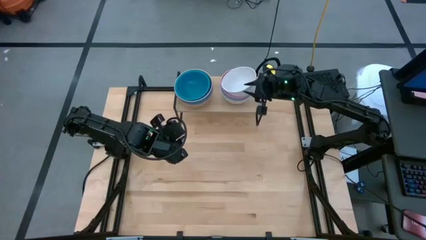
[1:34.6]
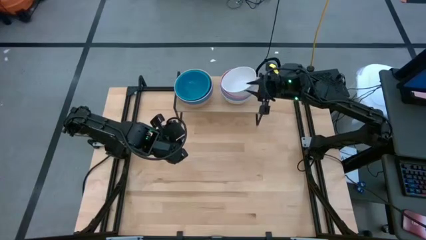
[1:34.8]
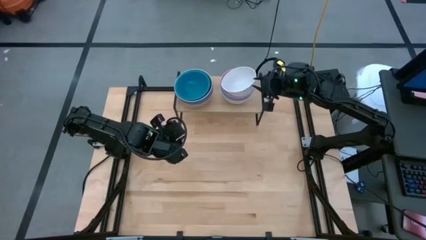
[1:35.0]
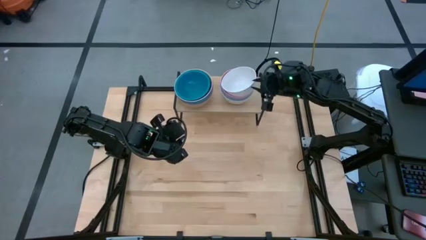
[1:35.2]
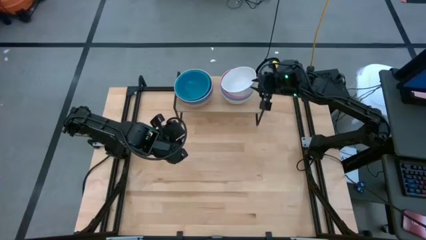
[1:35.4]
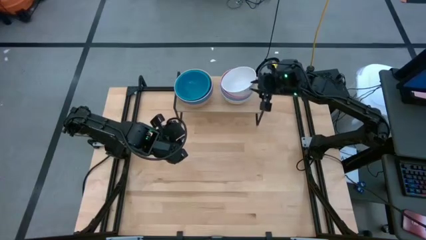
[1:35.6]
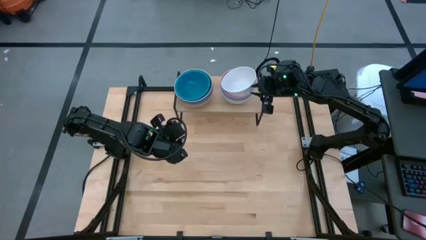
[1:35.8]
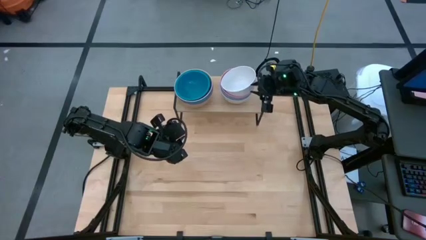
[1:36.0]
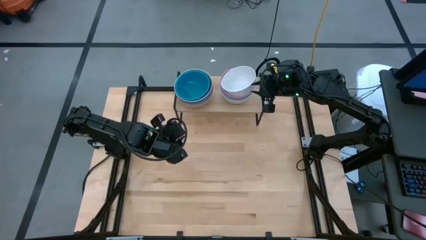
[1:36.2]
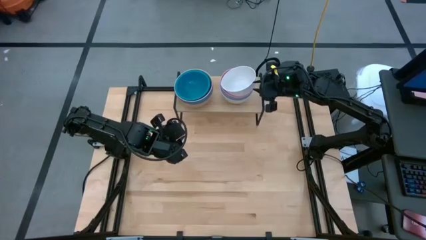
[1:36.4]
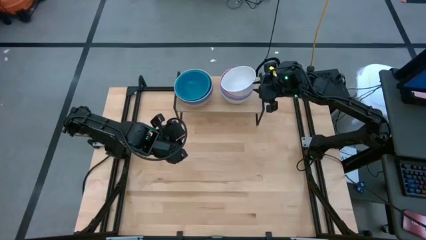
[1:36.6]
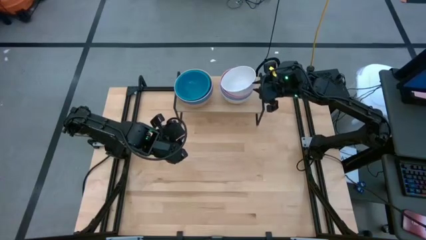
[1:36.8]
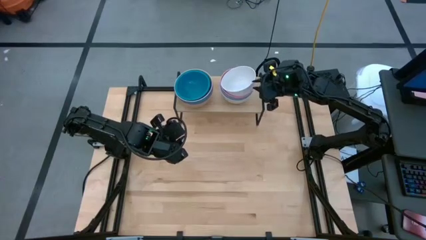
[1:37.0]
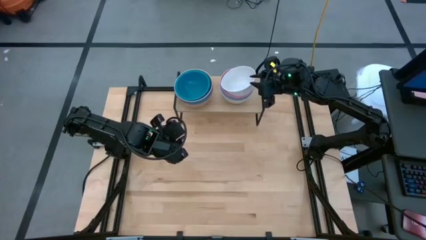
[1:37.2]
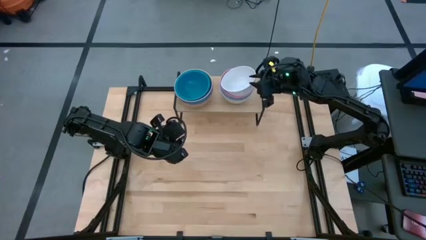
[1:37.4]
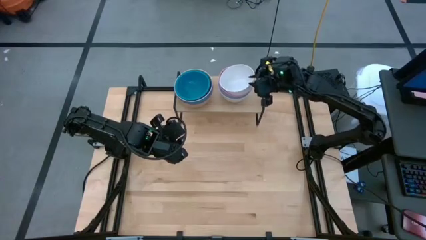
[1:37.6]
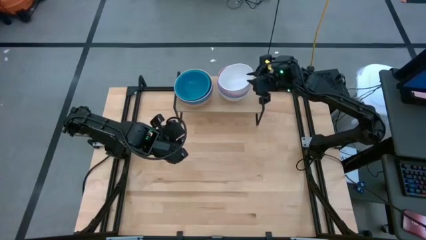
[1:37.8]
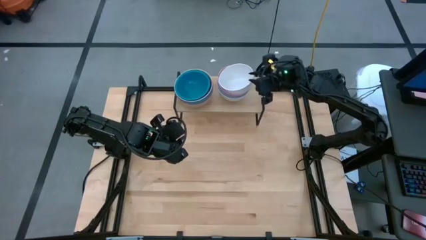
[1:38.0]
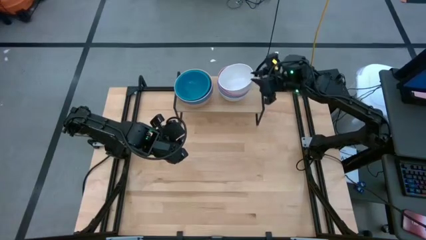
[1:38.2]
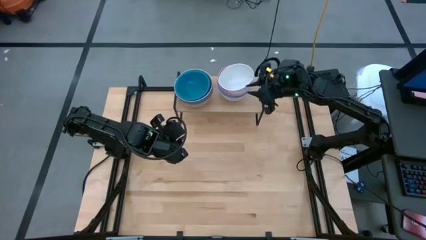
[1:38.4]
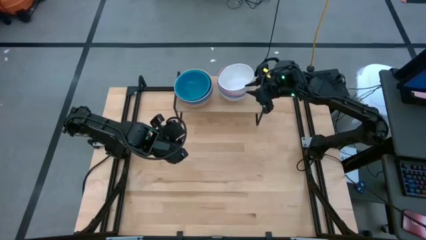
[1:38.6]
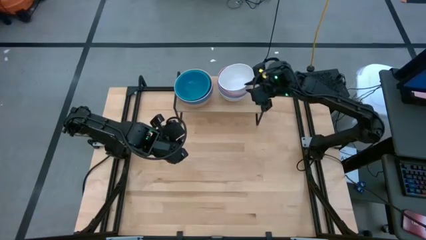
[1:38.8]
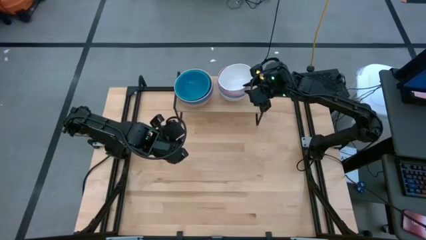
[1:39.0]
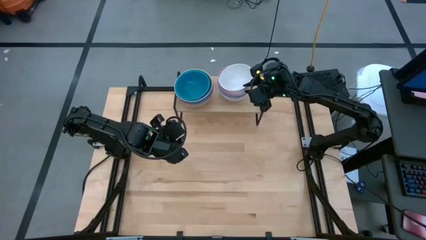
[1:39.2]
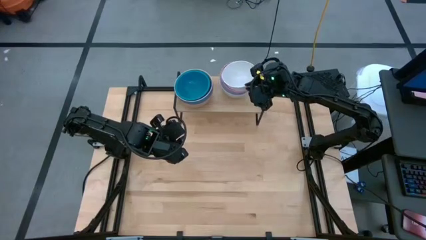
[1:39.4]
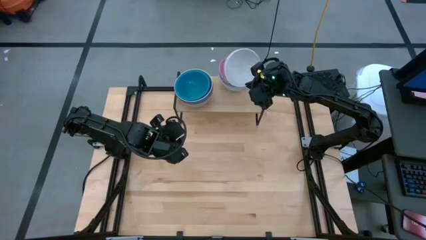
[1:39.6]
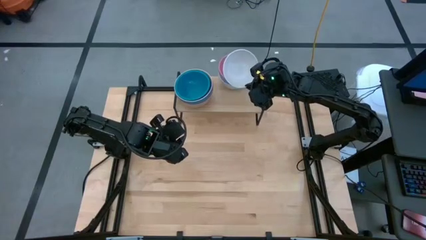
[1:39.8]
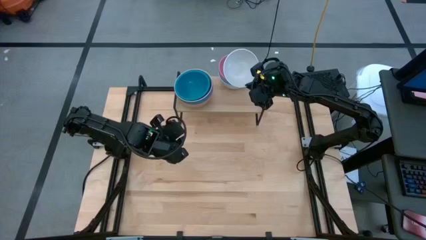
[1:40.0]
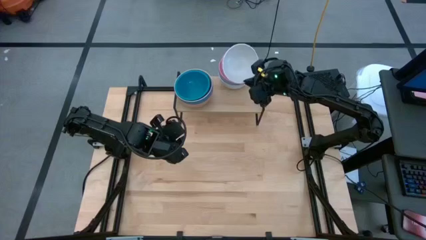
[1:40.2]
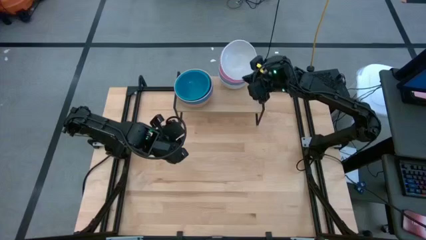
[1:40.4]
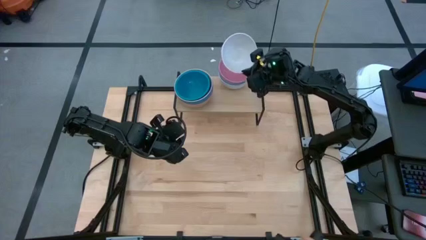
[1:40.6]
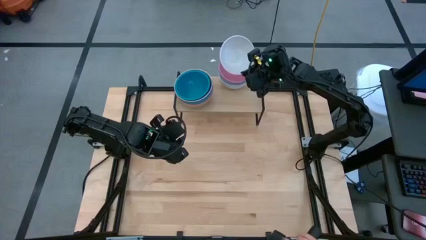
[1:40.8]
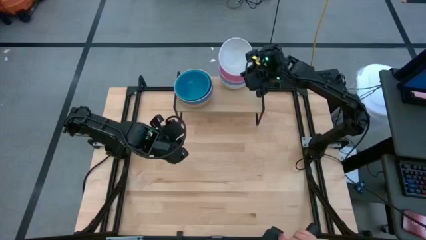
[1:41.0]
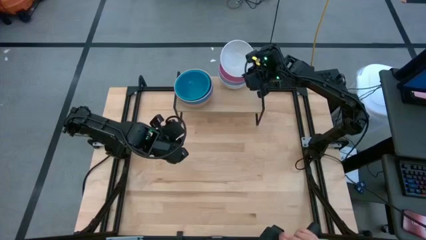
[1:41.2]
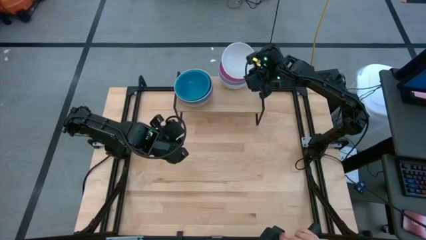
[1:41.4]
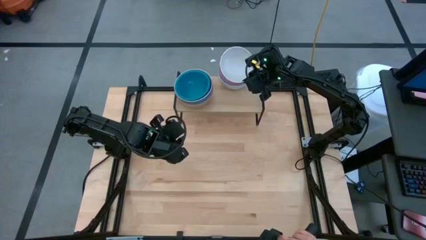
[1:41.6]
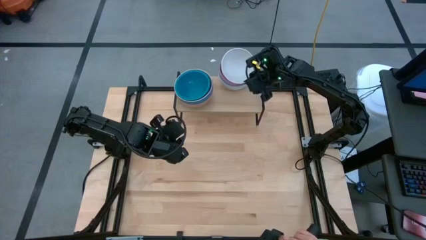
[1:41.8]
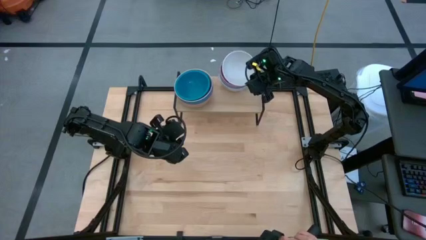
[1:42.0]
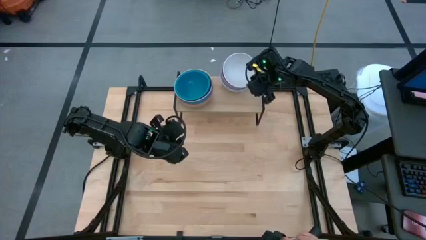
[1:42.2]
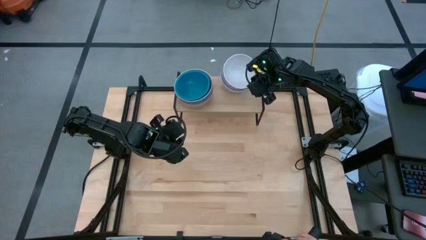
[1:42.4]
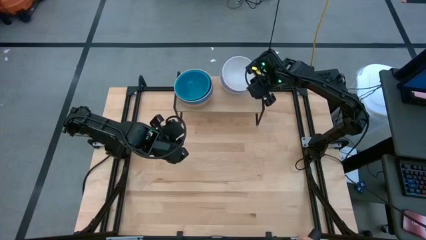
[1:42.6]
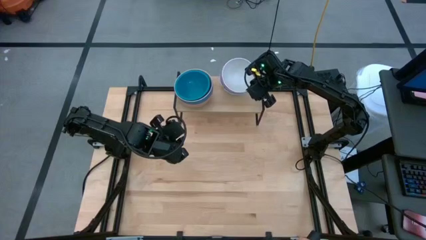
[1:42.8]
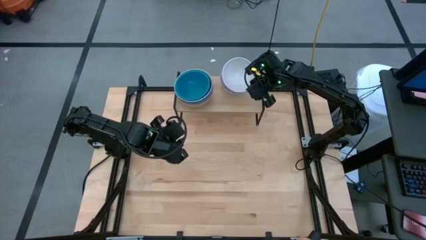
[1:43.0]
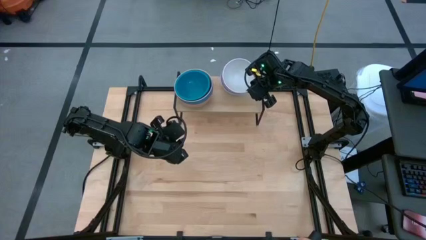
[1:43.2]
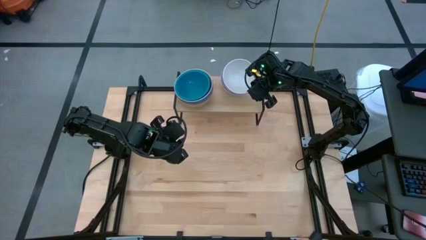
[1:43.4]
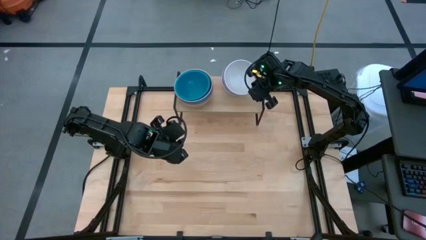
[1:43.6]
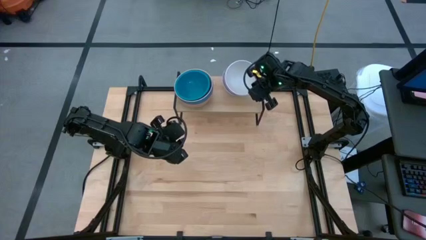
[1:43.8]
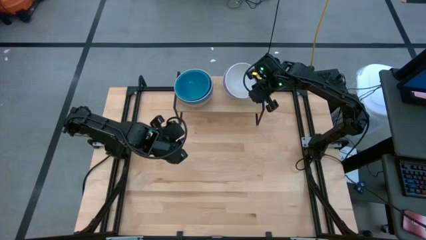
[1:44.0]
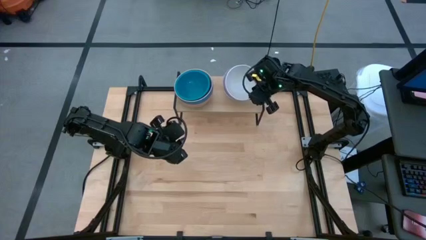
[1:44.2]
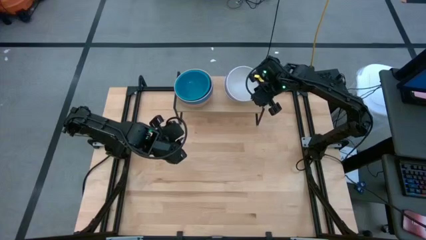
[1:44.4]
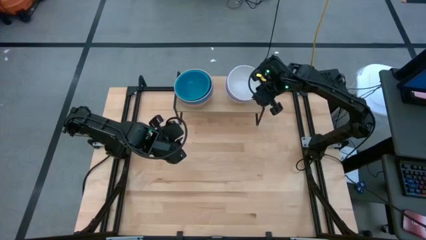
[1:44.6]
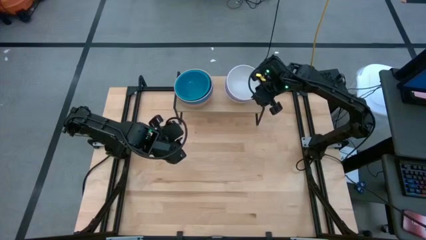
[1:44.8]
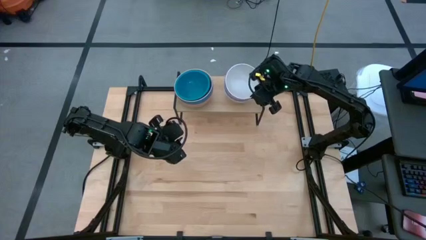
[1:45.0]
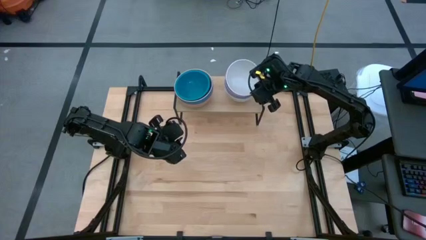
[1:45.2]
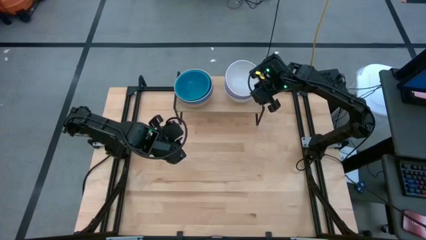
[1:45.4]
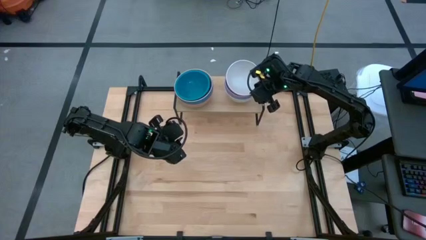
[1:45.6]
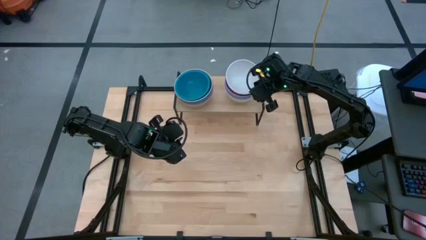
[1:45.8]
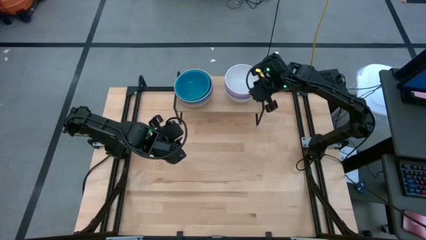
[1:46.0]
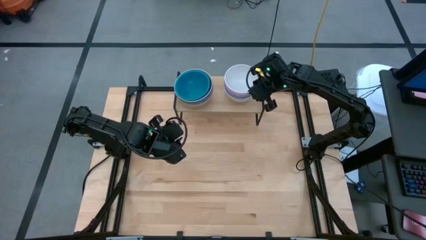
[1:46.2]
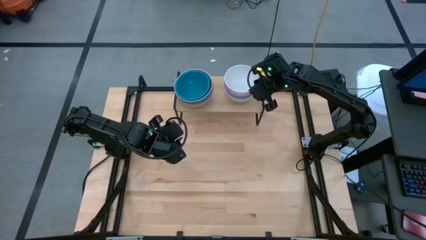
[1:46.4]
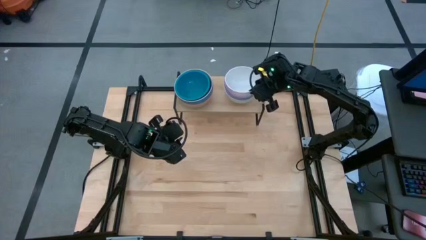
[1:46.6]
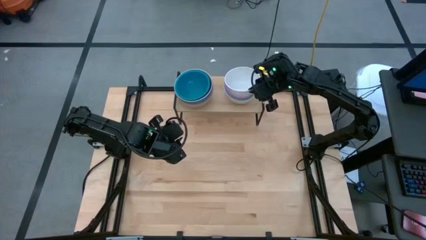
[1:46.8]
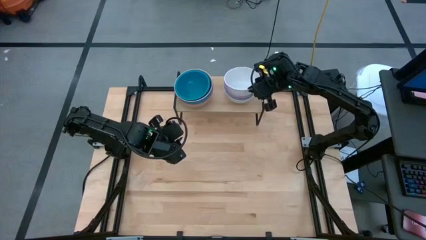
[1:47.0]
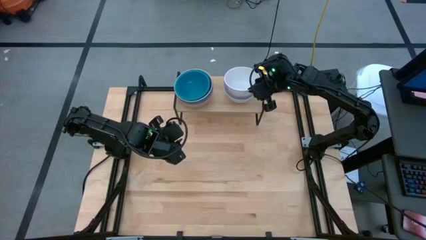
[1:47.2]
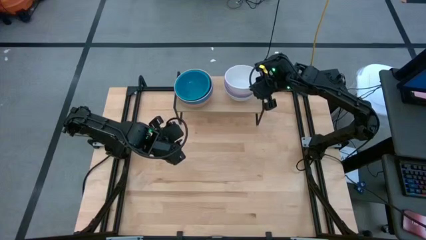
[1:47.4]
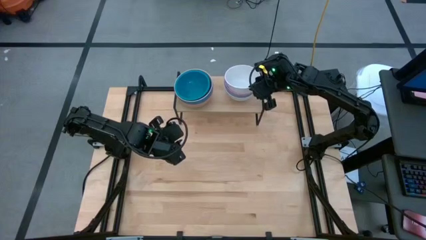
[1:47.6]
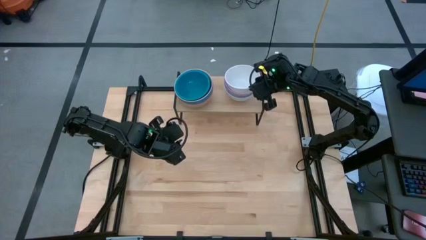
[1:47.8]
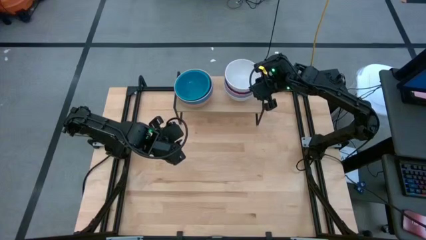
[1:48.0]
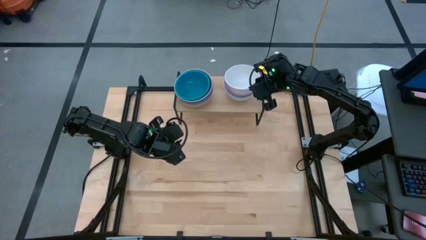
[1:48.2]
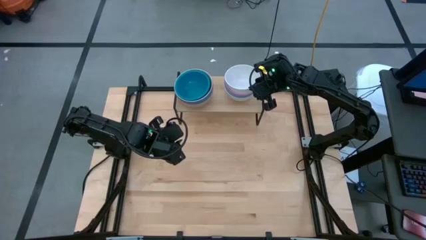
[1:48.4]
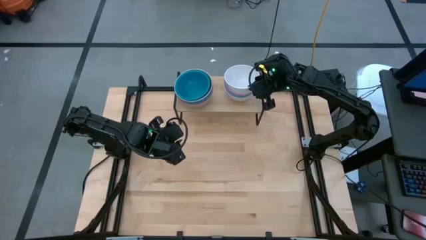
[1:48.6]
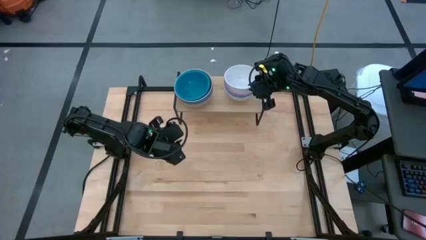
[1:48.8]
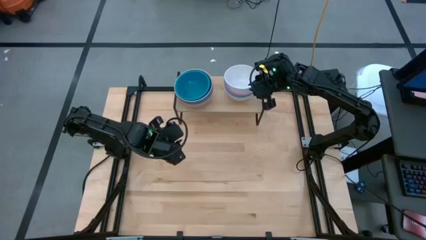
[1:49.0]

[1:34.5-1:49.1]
Task: Place and stack bowls onto a shelf
Stack the white bowl on top of the pink bowl on the shelf

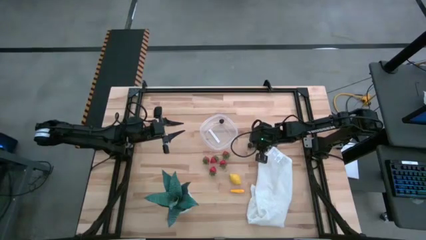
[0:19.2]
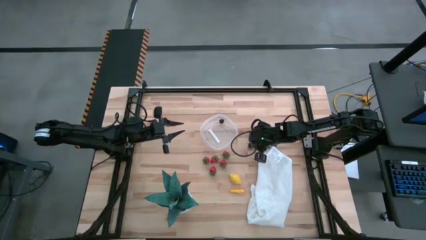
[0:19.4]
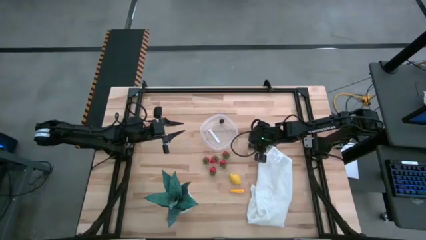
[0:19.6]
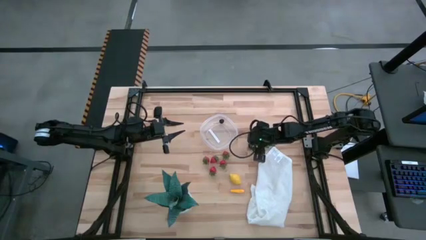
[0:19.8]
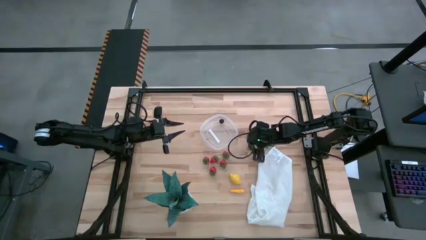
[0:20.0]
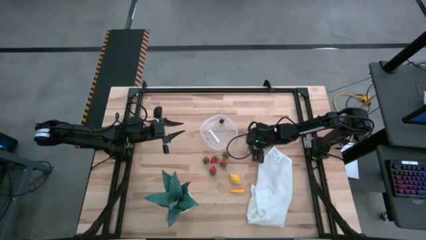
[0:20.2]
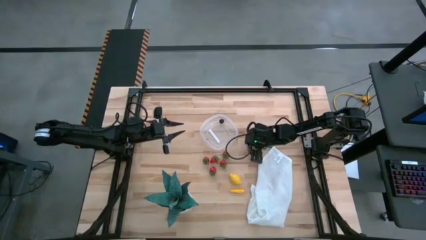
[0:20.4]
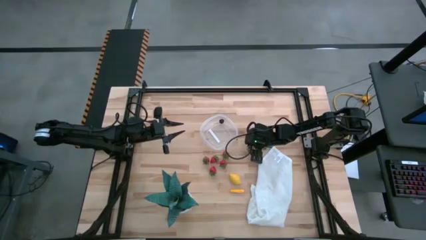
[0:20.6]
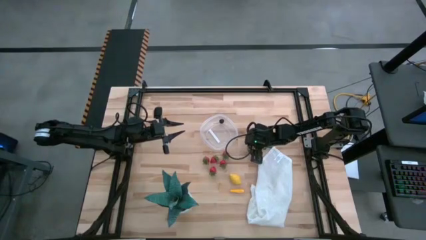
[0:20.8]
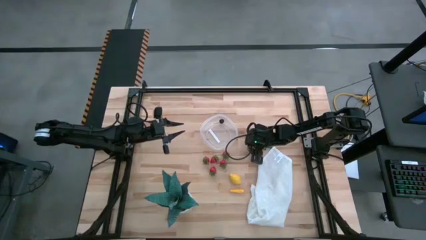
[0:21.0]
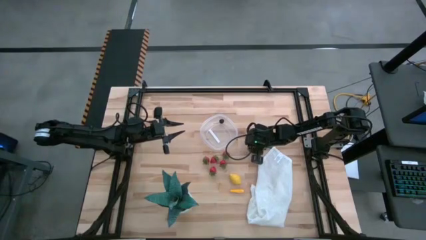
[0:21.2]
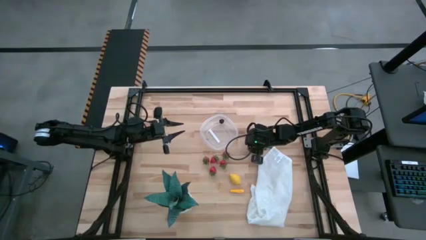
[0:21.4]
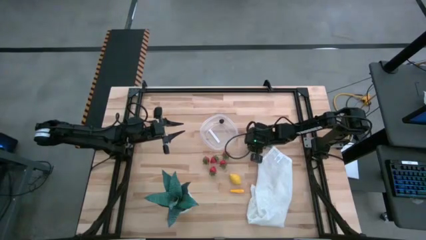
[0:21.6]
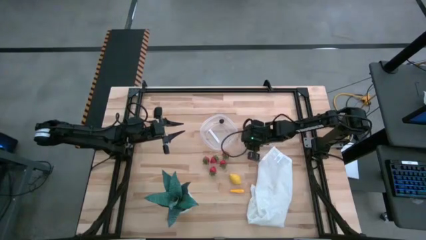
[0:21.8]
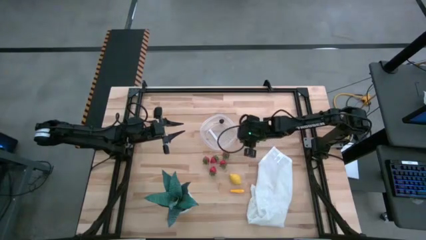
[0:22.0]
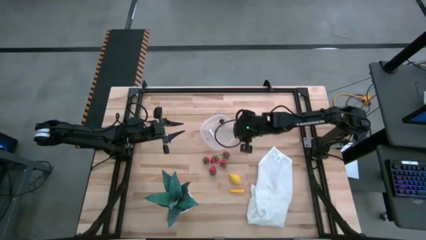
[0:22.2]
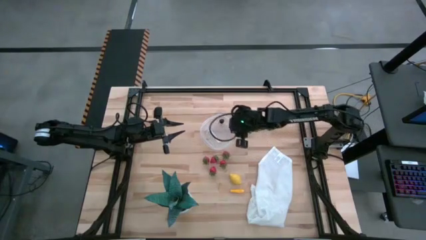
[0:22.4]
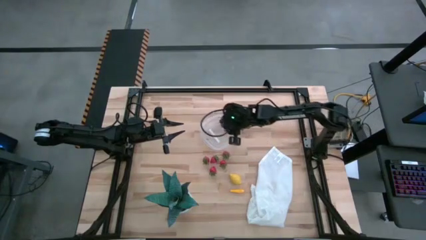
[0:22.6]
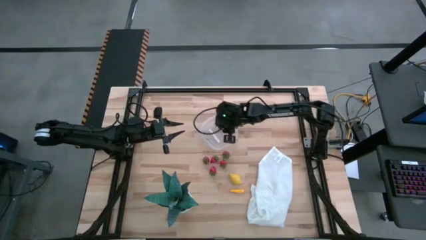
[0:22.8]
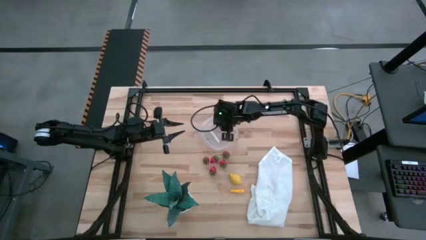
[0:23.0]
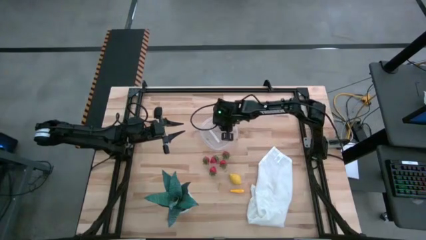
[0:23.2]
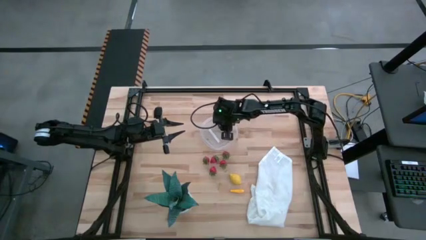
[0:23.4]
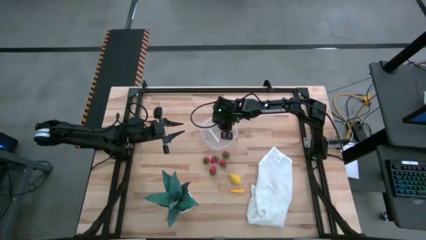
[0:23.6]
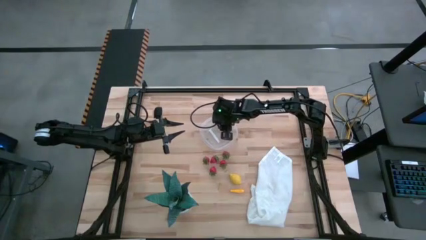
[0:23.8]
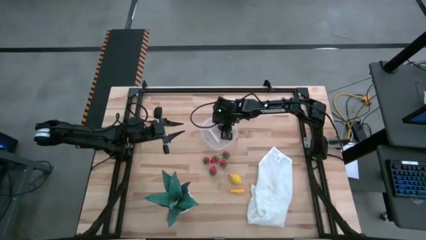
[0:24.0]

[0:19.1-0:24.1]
Task: Pick and placing Produce into tupperware
Put the blackberry into the bin
